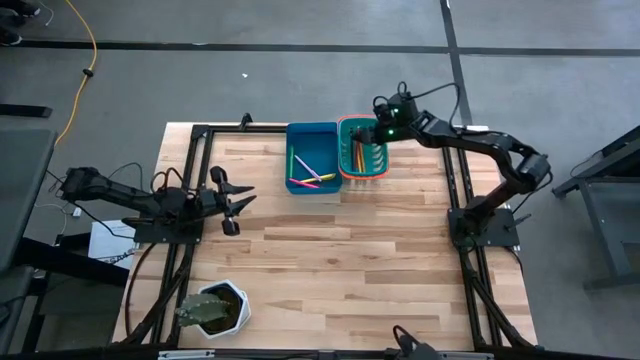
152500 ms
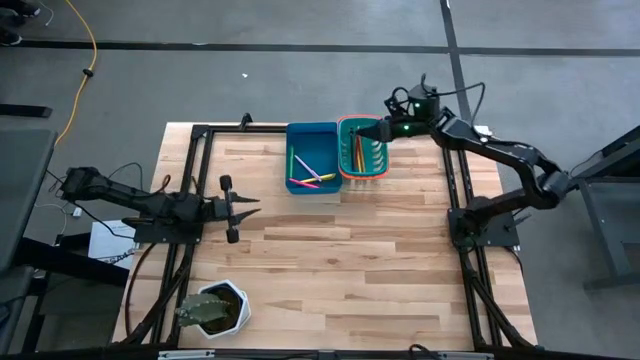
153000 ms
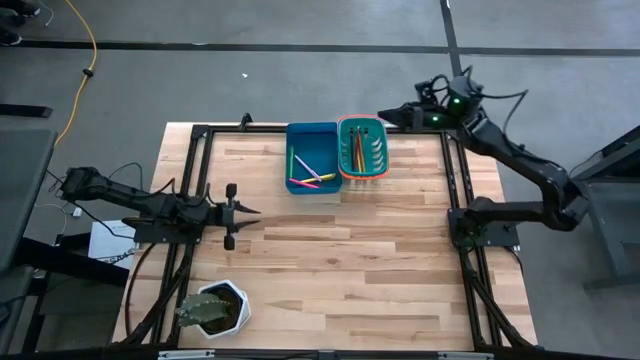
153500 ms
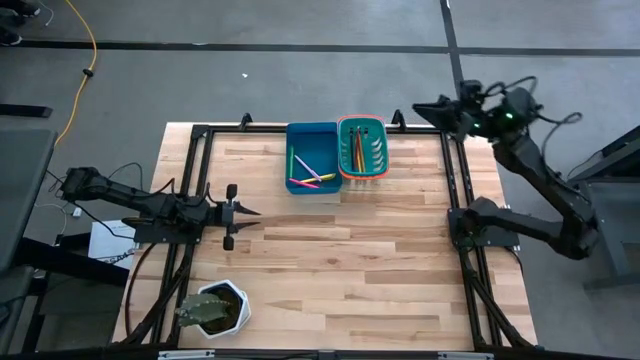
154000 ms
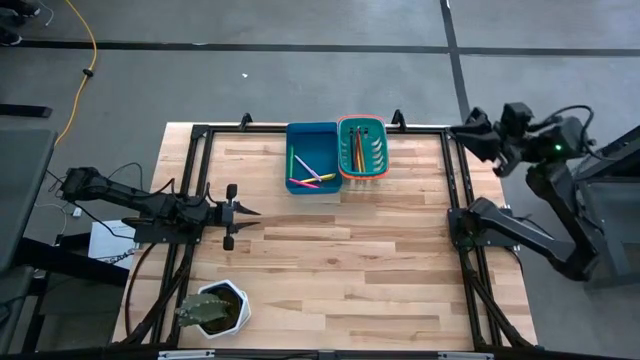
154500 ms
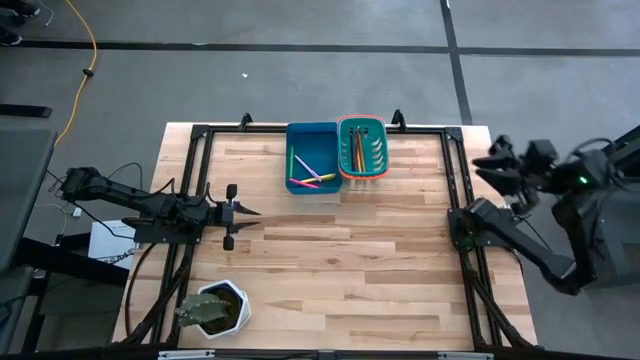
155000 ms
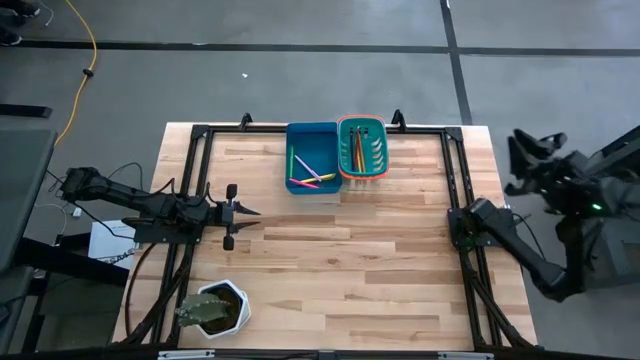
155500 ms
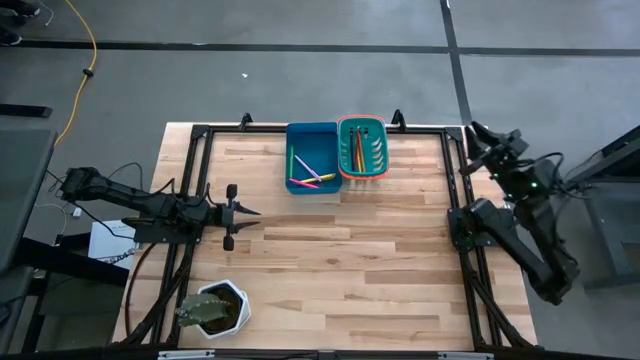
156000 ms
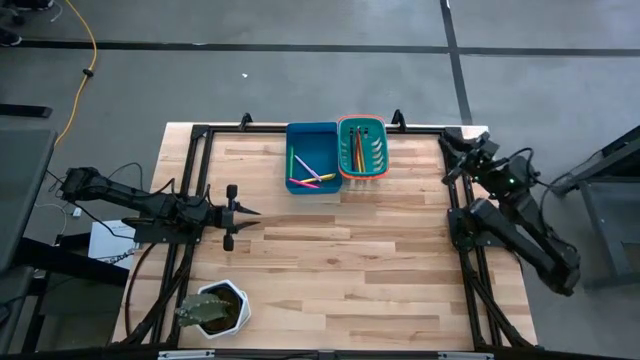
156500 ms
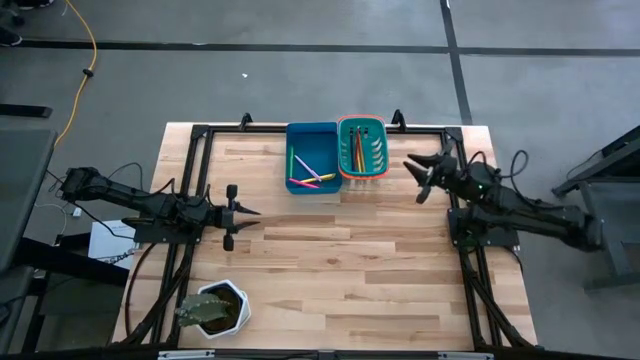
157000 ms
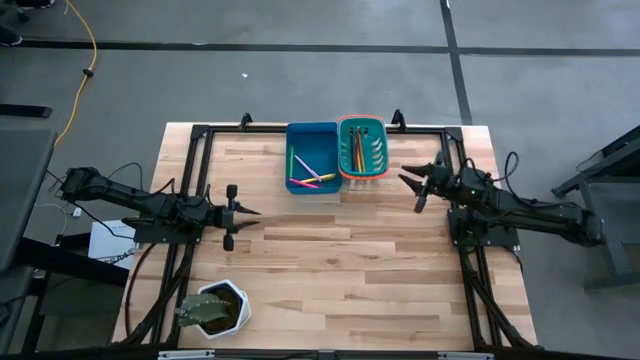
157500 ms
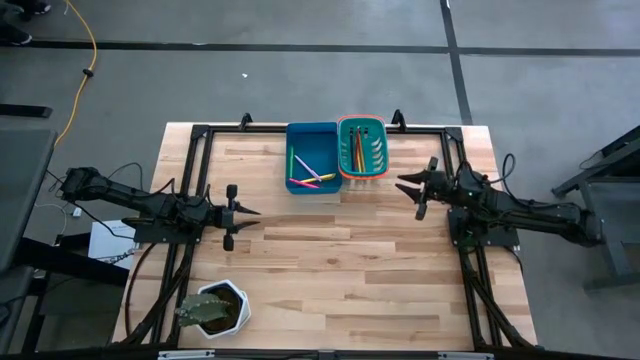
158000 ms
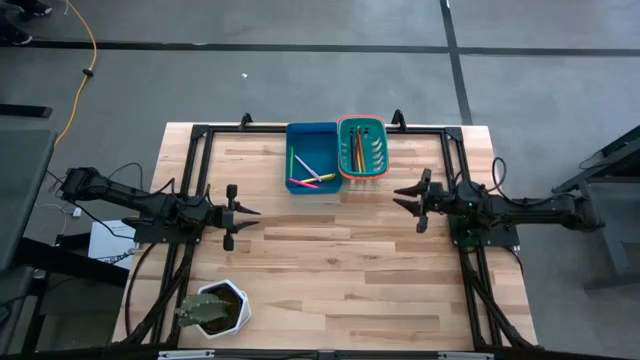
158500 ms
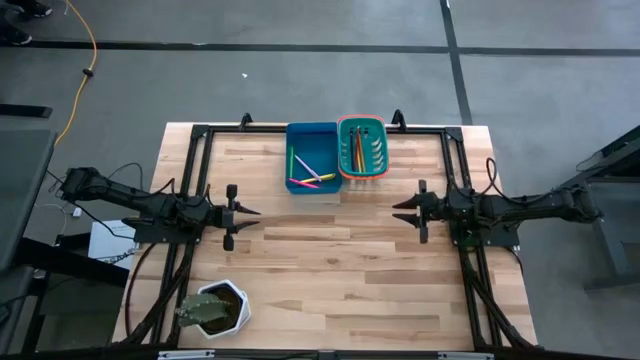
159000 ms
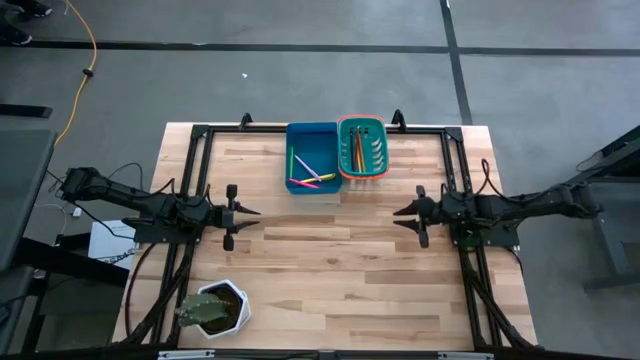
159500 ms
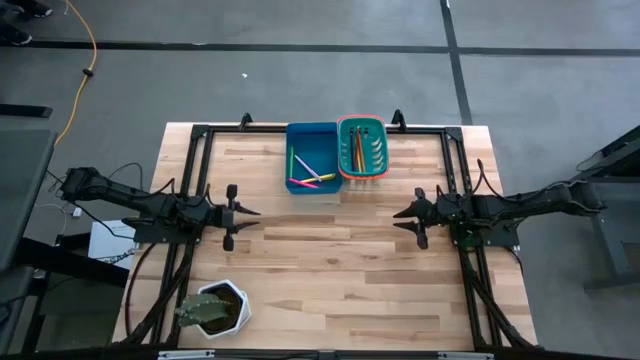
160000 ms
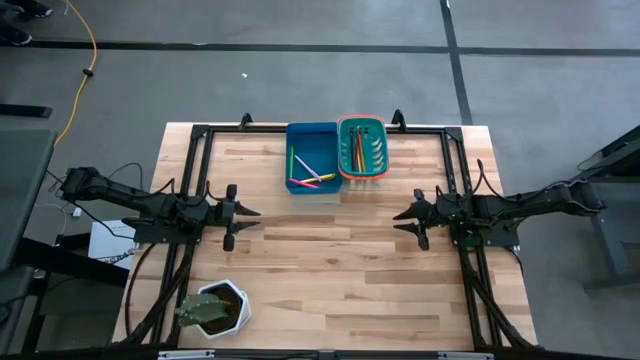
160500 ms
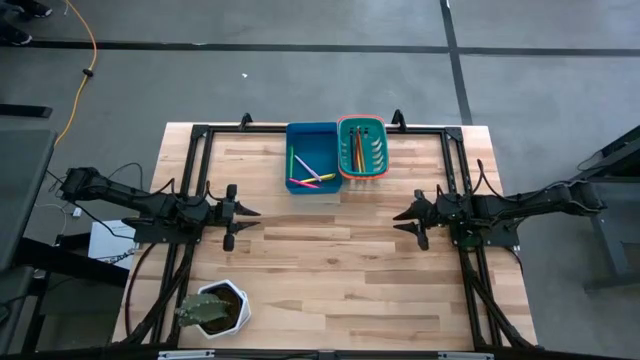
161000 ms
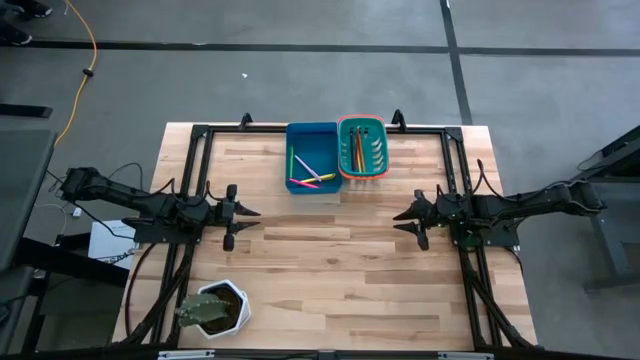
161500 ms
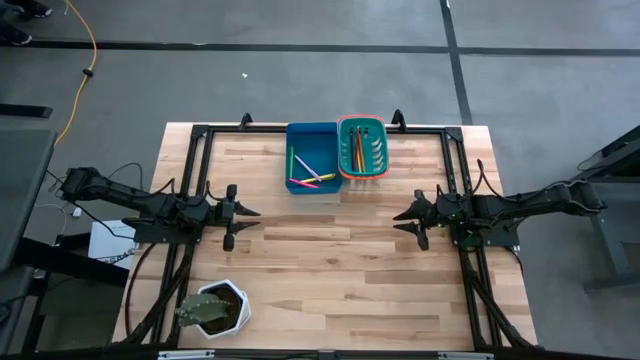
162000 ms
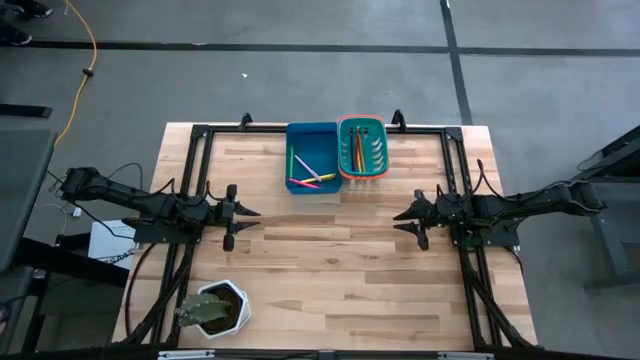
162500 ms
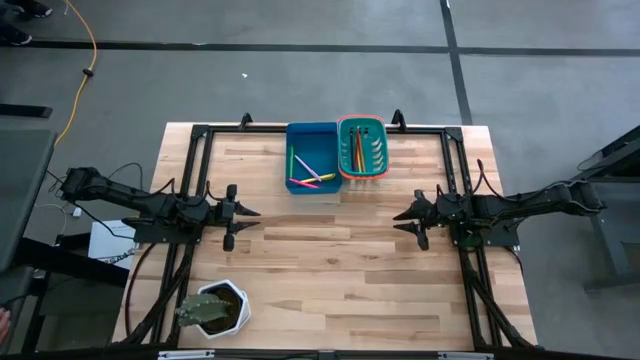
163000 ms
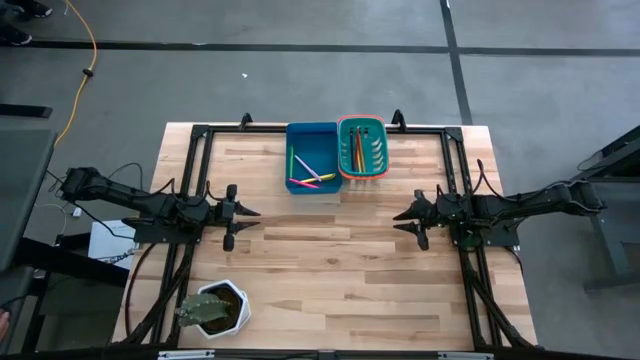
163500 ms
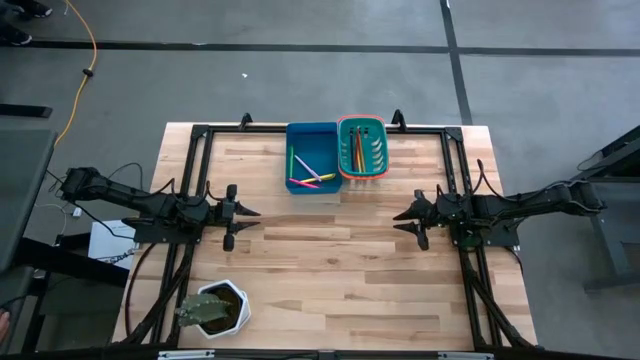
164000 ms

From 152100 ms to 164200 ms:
Task: Sort pens & pencils
Return to Home Position

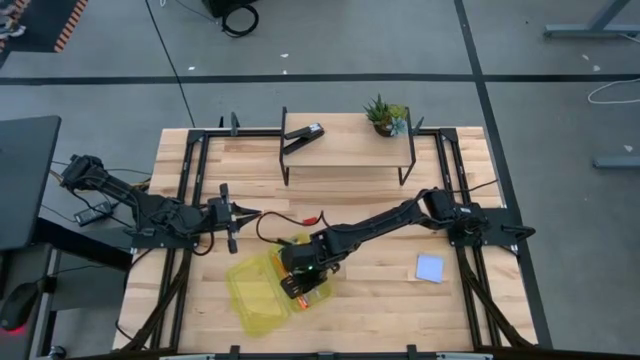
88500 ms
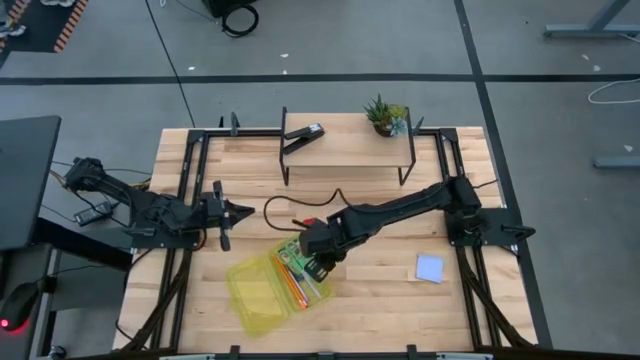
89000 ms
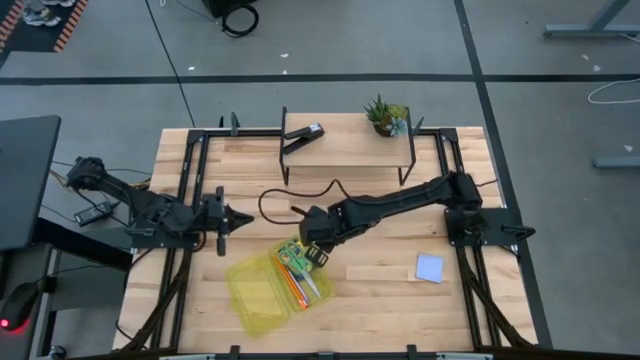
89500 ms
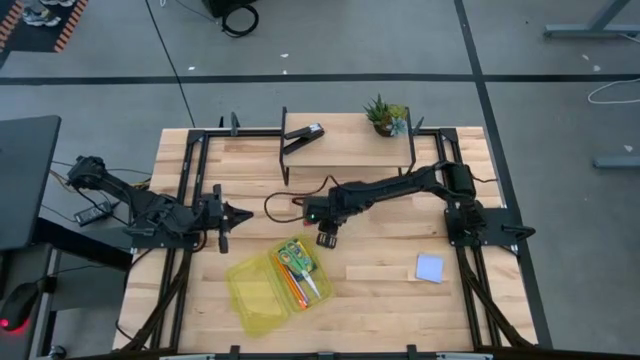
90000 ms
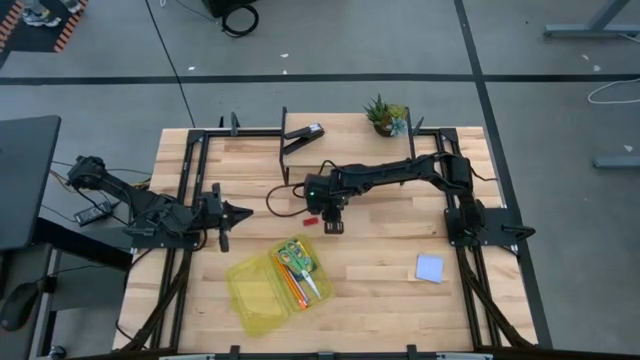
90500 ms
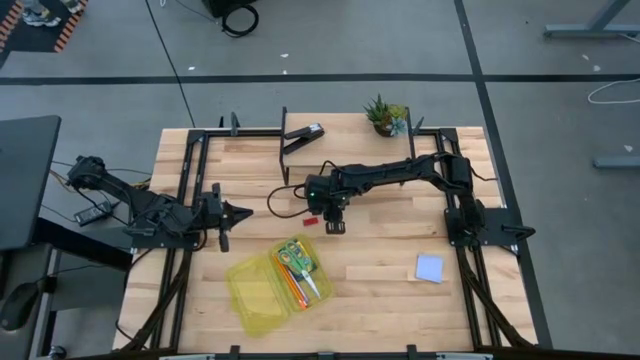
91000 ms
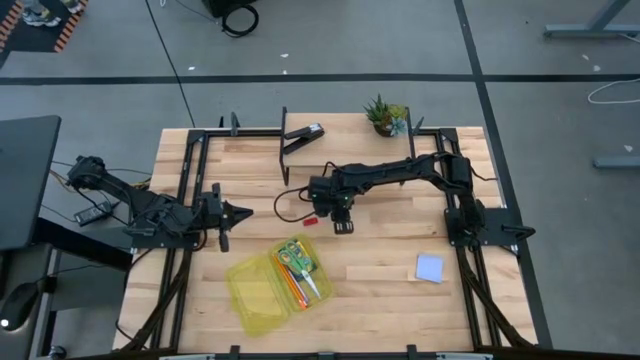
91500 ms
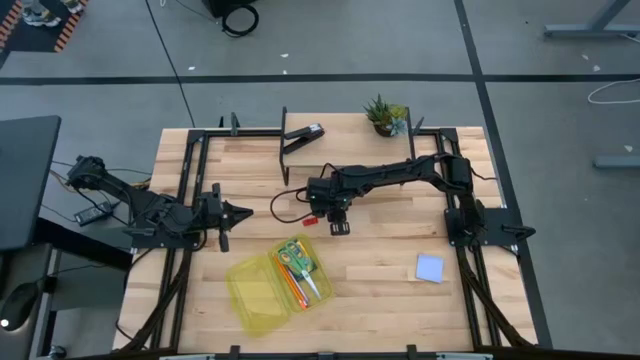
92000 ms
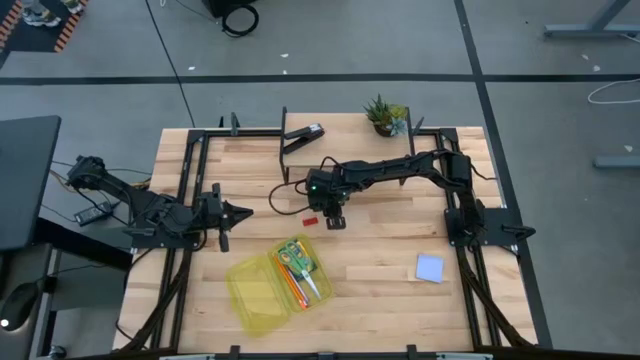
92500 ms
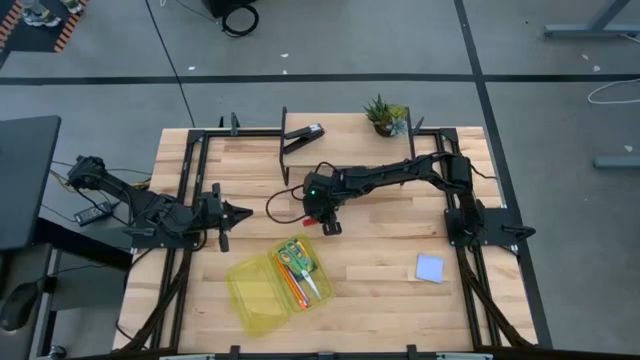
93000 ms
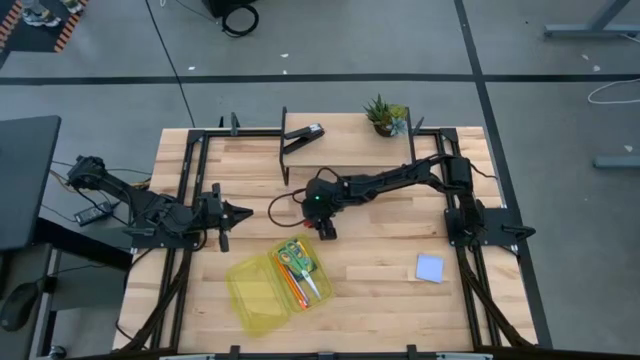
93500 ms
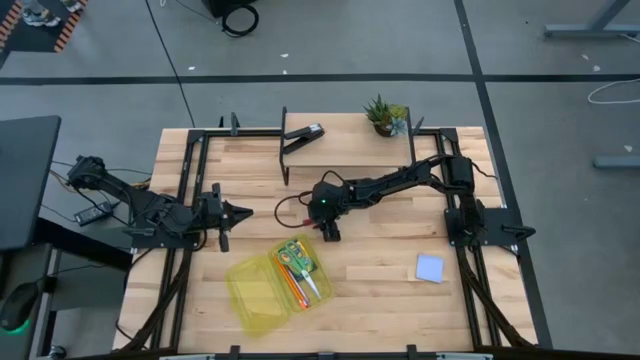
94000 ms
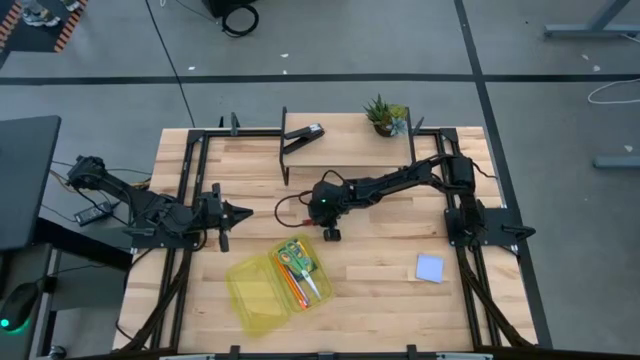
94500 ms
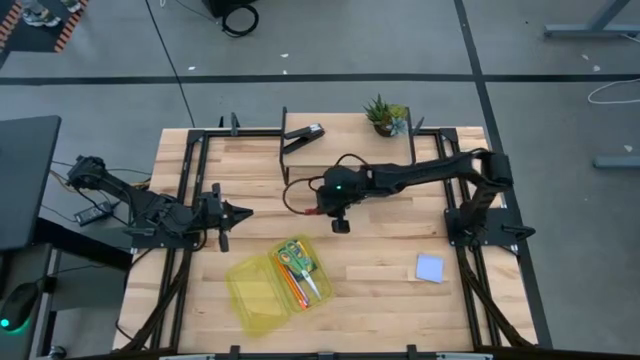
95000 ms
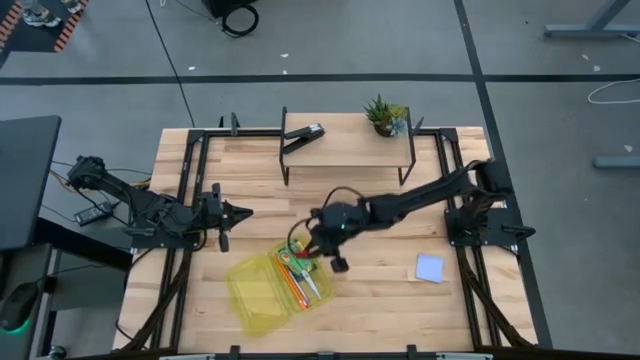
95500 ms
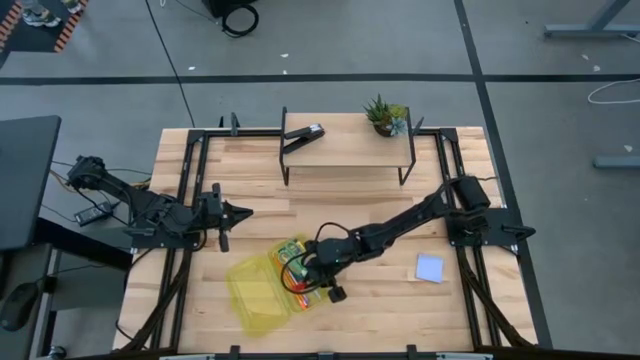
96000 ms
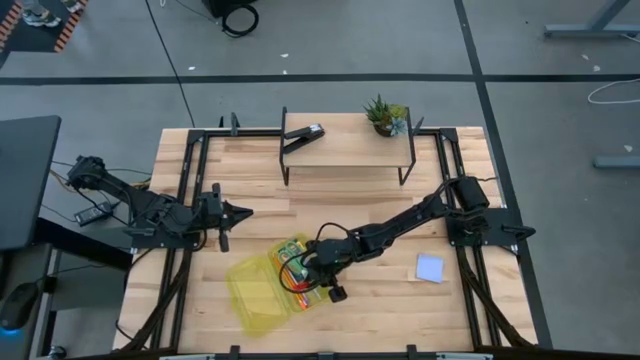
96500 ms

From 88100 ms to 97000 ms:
Task: Pack school essentials
Put the red eraser into the supply box
